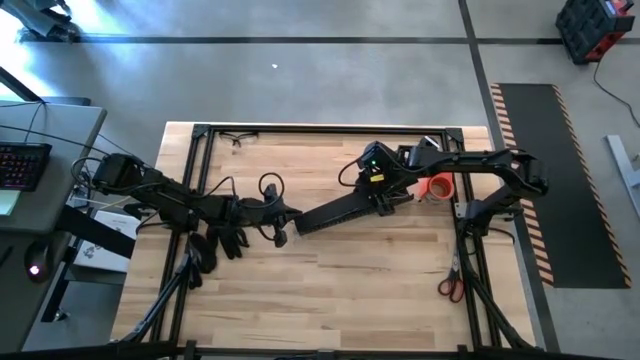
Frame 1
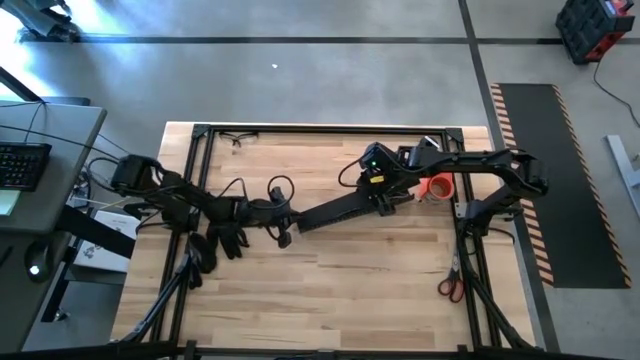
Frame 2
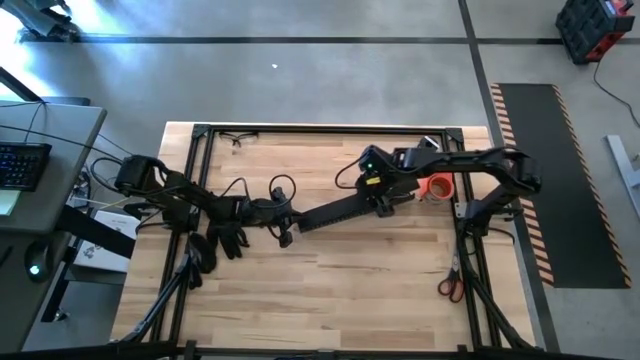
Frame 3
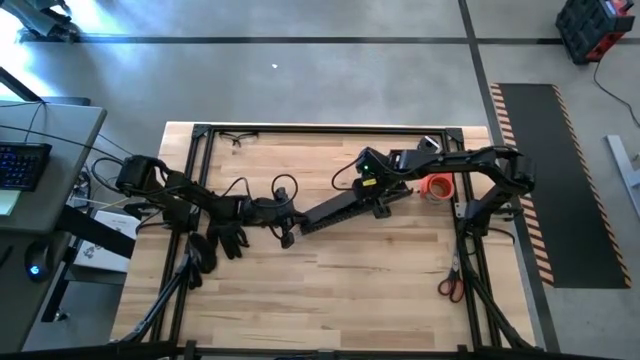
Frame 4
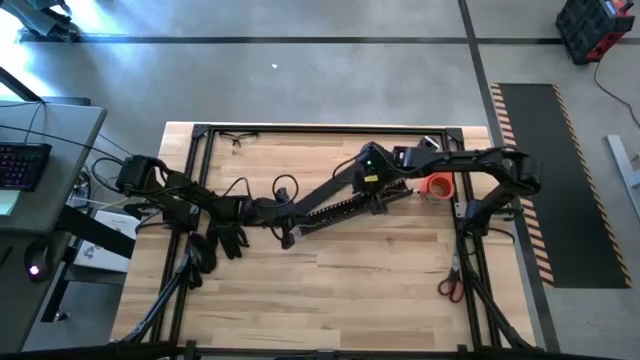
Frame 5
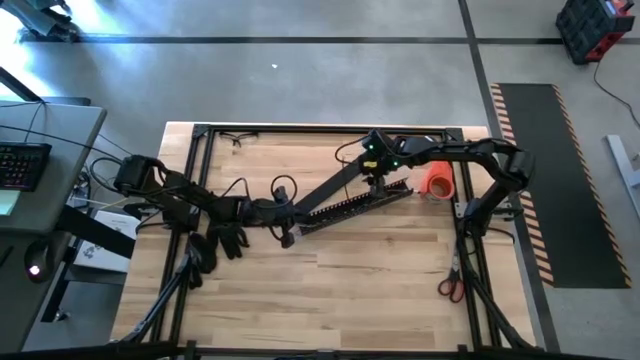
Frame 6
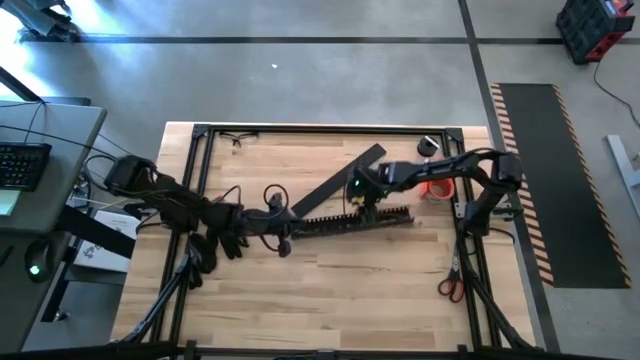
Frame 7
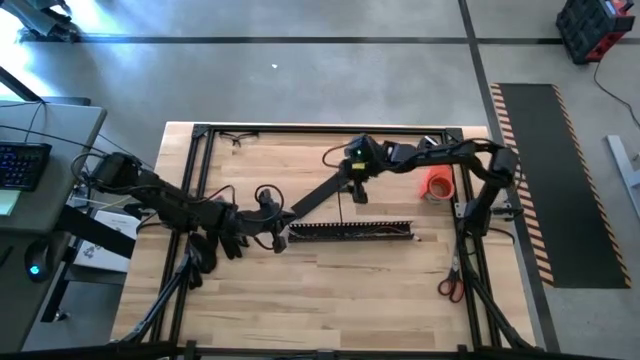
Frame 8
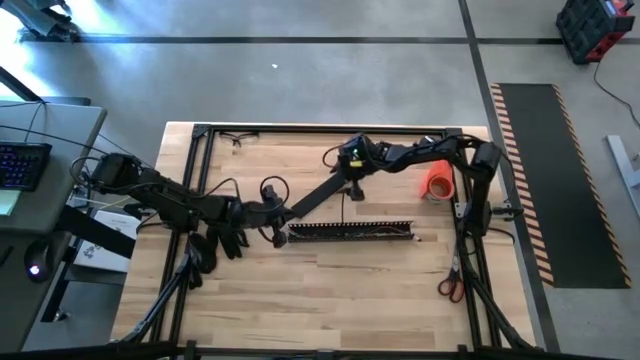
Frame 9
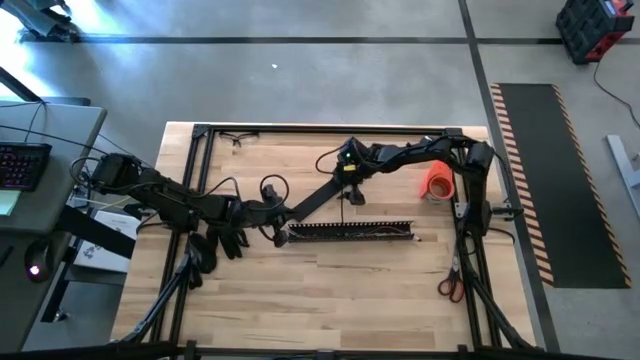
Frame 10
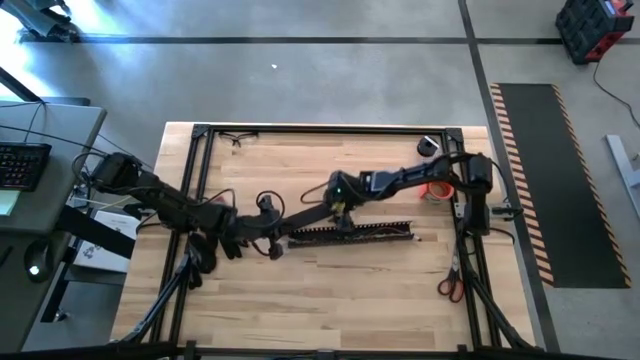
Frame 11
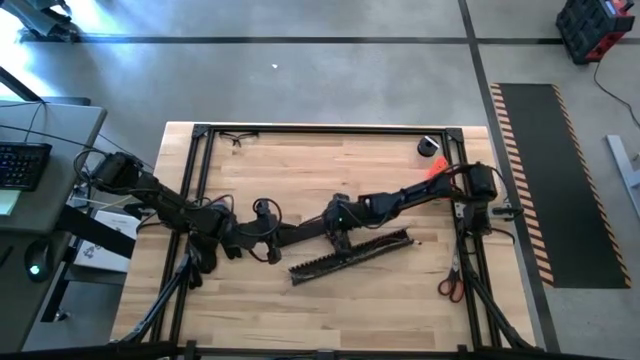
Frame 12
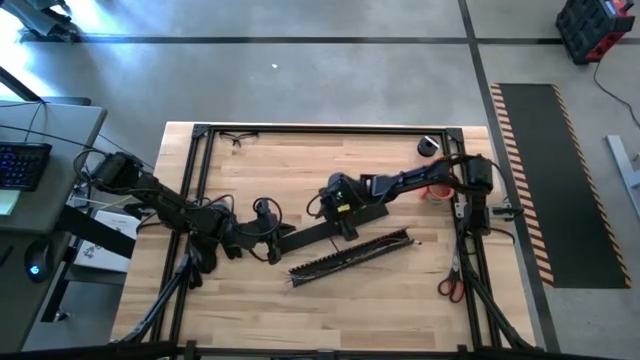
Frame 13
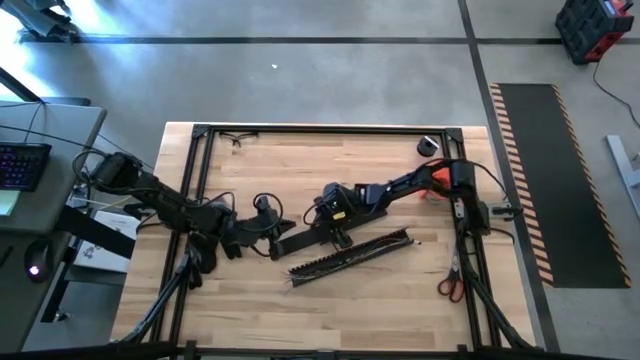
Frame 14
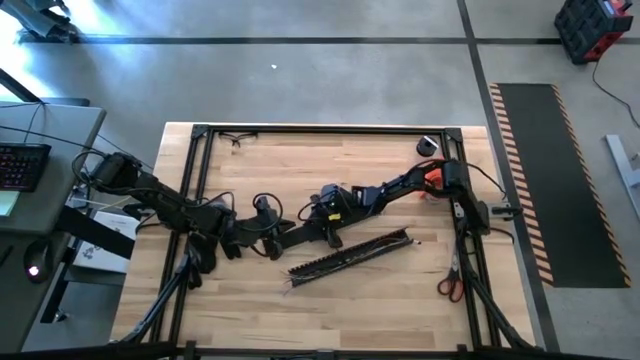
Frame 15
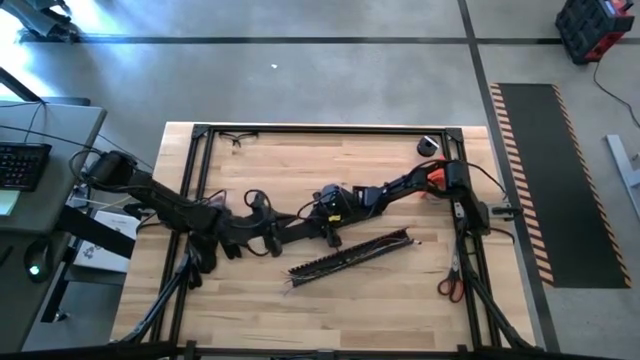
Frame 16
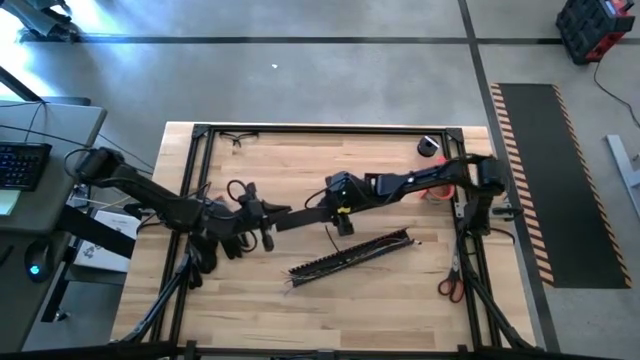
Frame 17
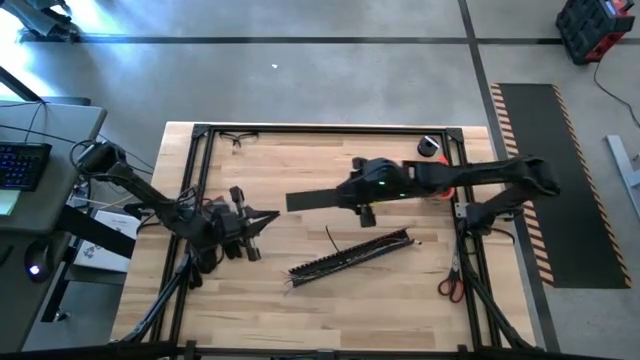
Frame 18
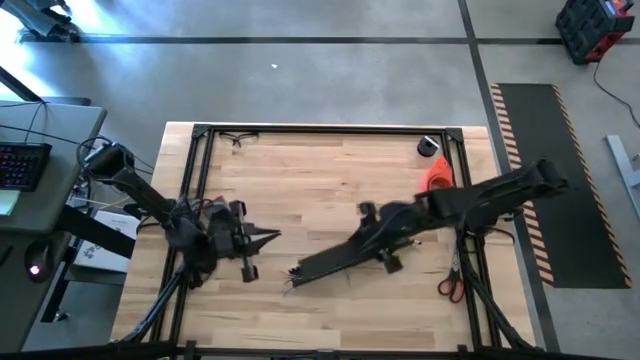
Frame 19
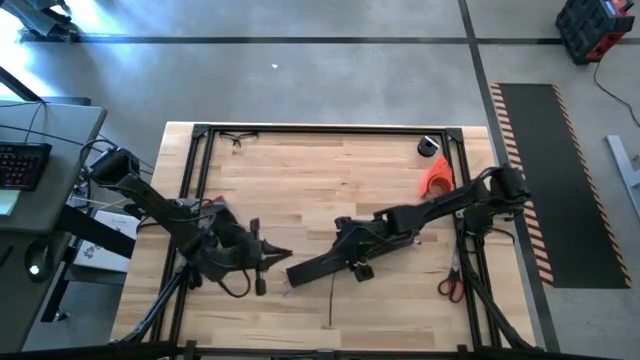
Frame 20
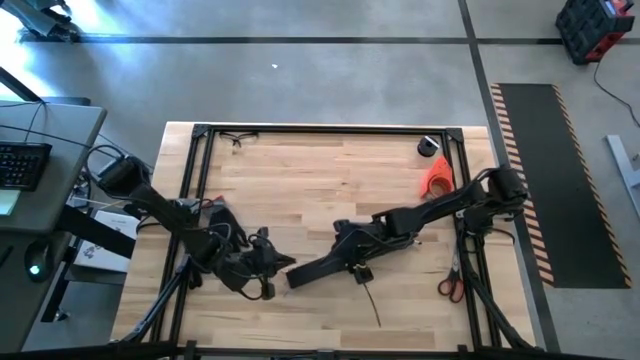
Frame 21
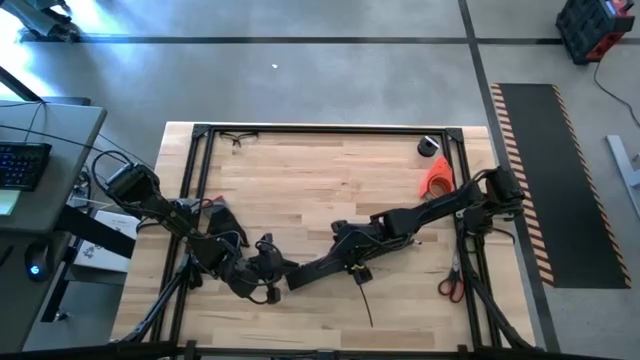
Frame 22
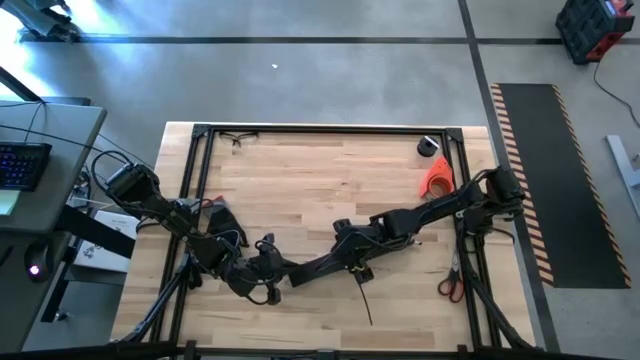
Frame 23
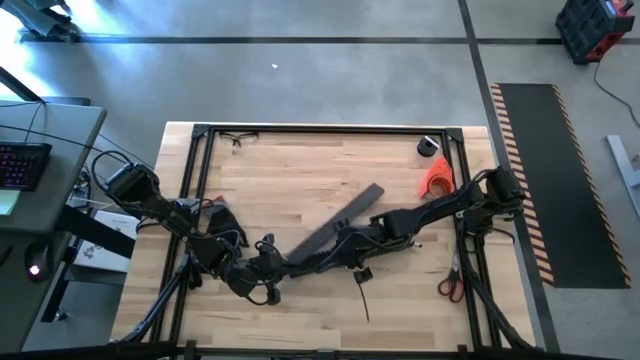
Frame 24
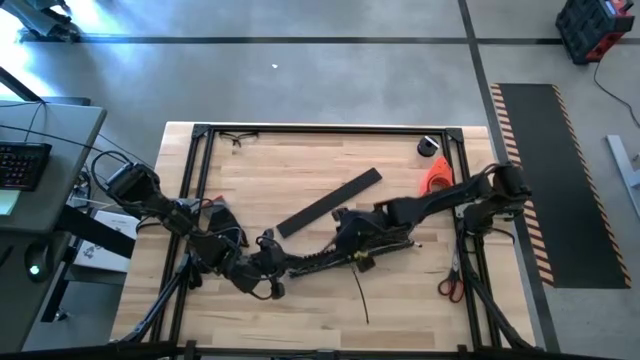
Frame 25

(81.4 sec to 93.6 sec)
Task: Ziptie cables
Close the black cable duct

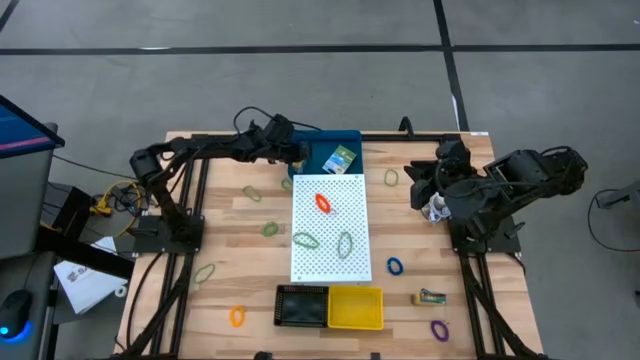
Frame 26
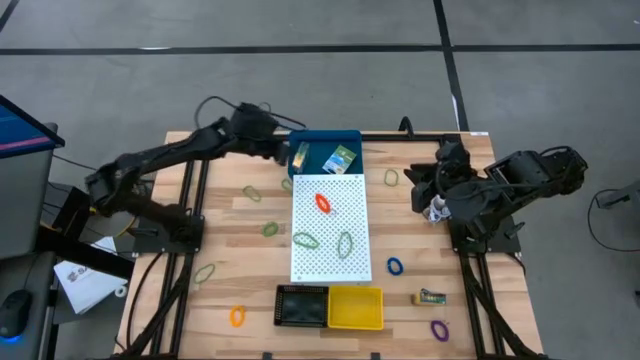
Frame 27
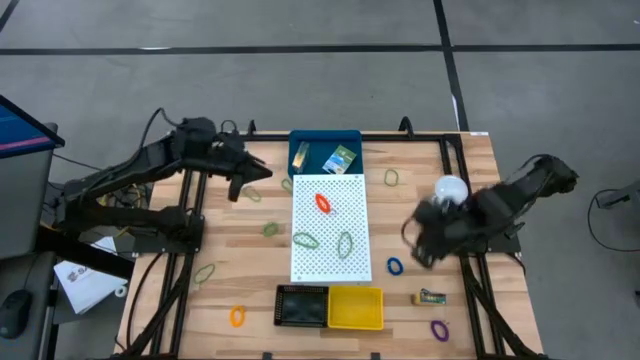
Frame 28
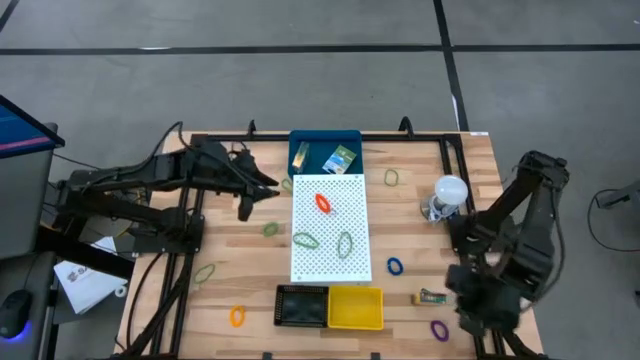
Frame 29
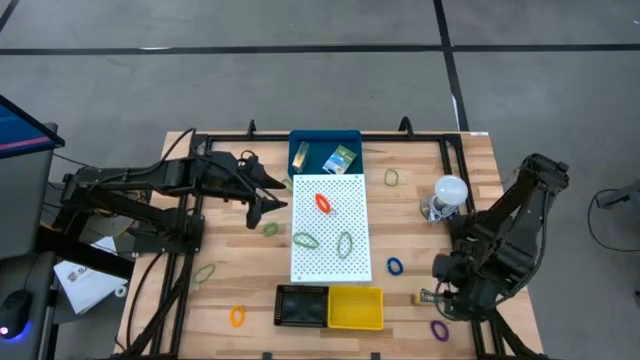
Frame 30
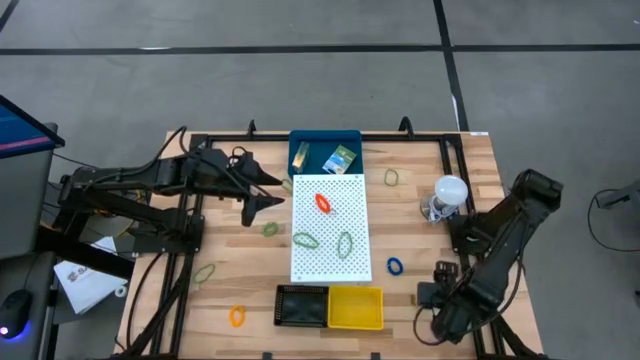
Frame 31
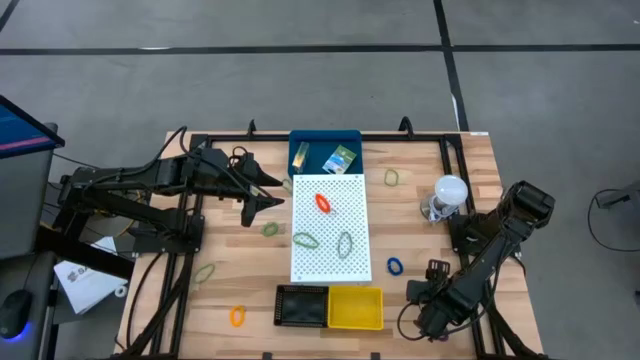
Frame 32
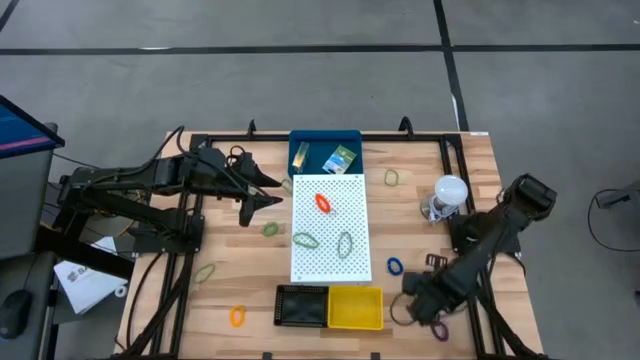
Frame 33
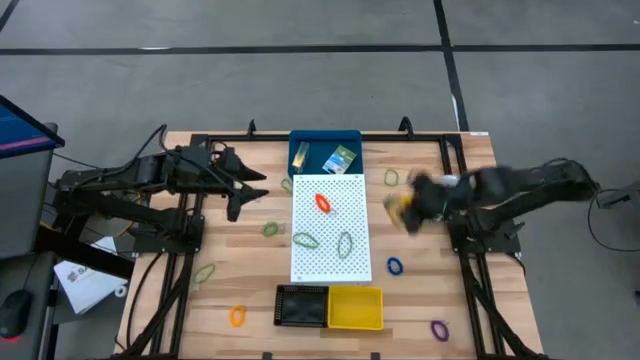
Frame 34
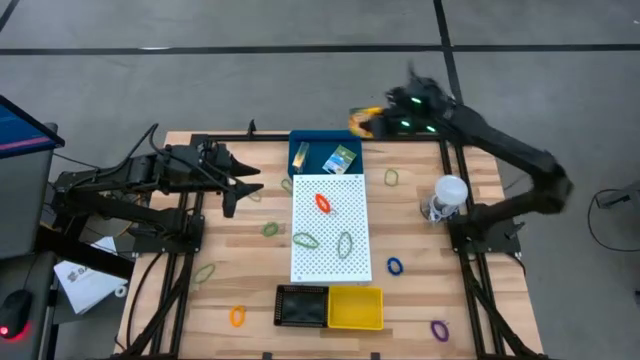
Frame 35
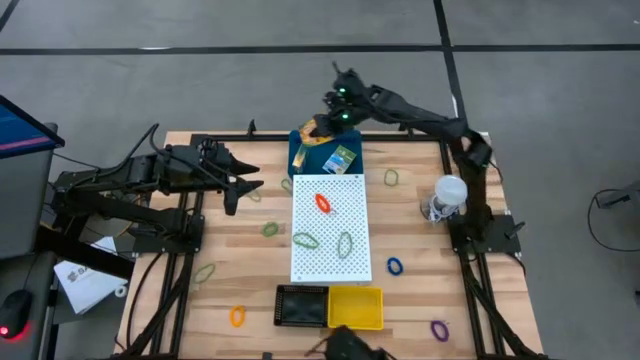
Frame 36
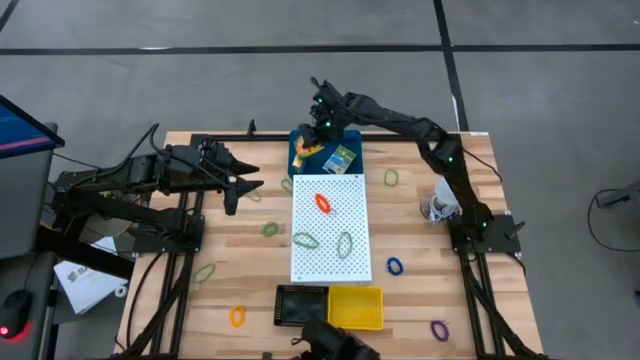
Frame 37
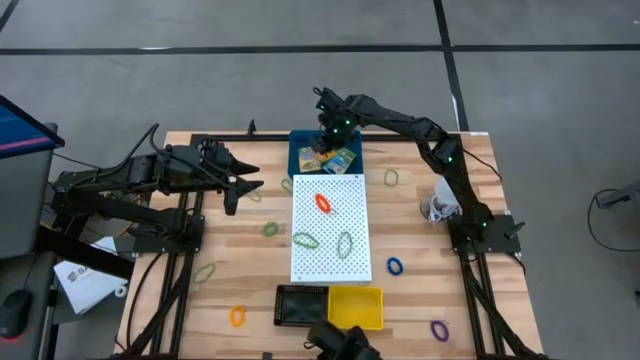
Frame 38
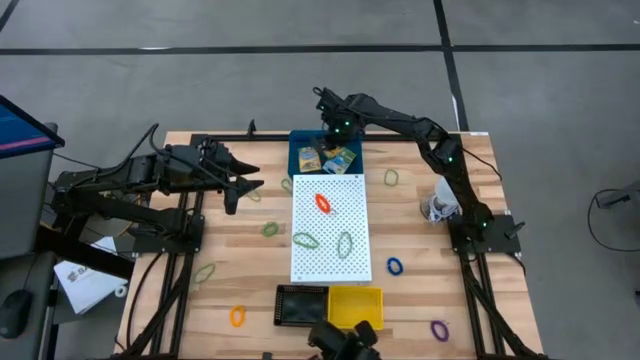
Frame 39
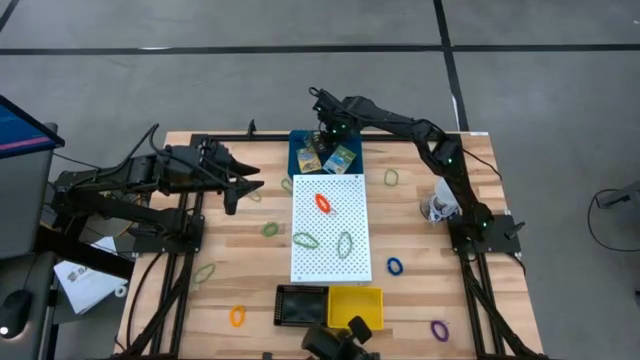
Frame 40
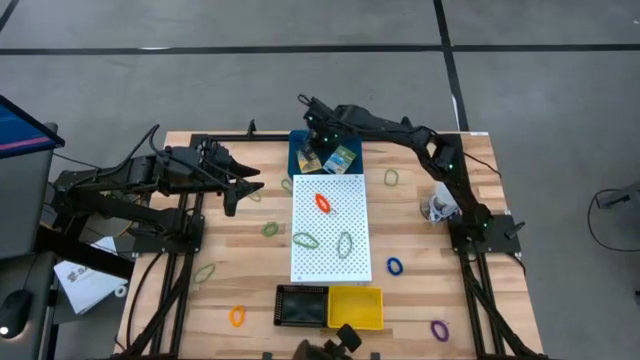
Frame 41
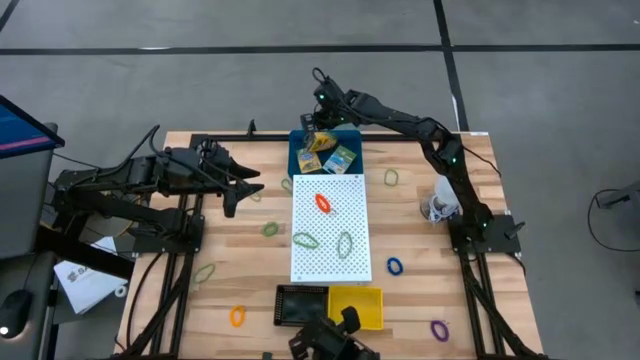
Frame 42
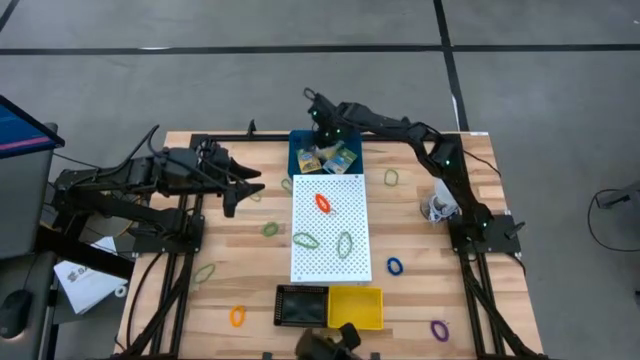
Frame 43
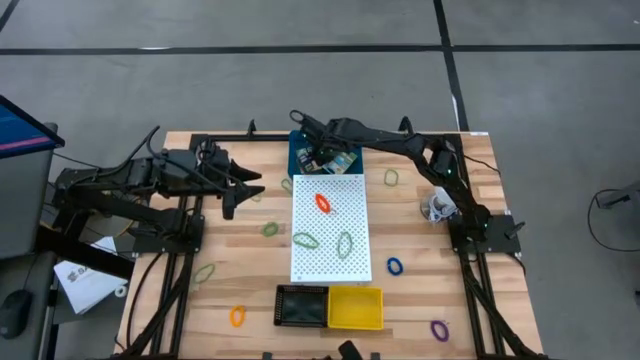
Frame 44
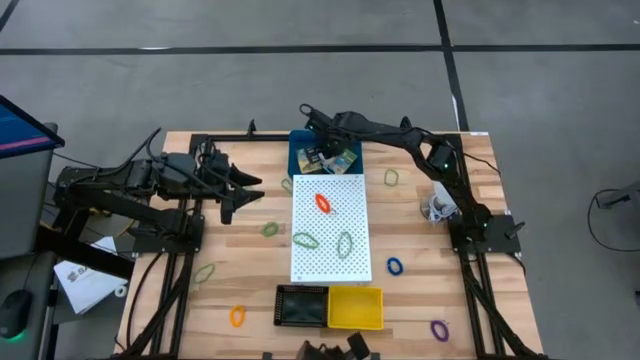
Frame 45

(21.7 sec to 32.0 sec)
Task: Pick & Place Office Desk Supplies
Put the crayon box into the blue bin
